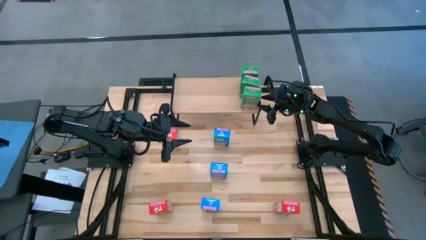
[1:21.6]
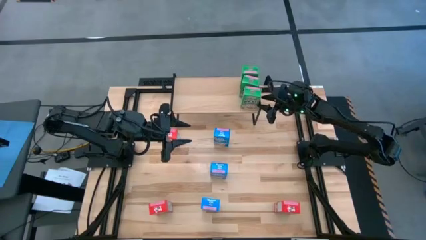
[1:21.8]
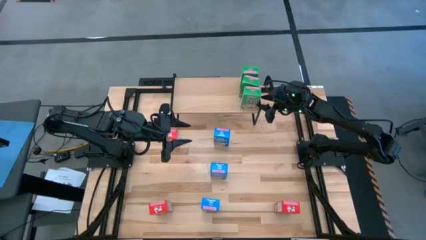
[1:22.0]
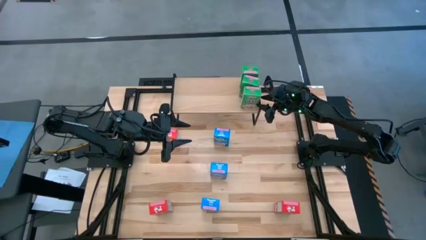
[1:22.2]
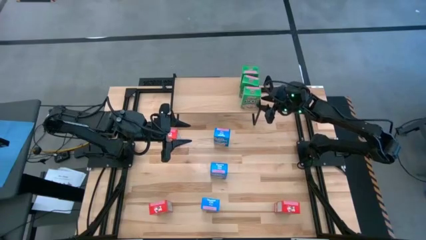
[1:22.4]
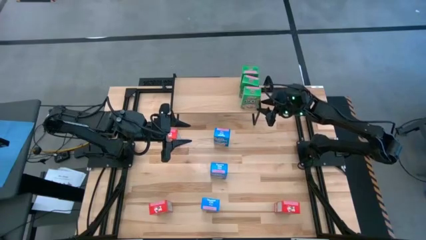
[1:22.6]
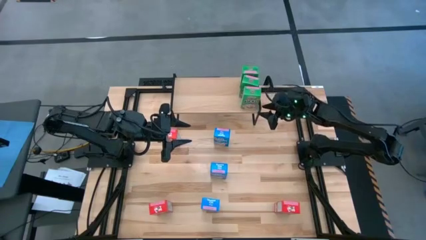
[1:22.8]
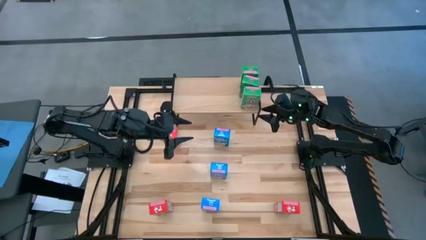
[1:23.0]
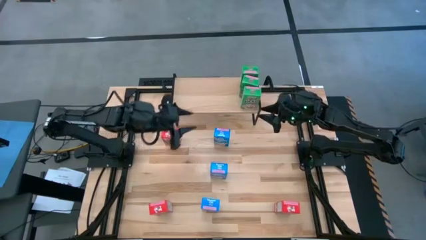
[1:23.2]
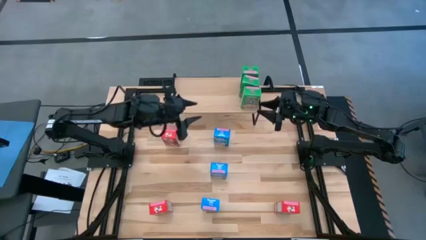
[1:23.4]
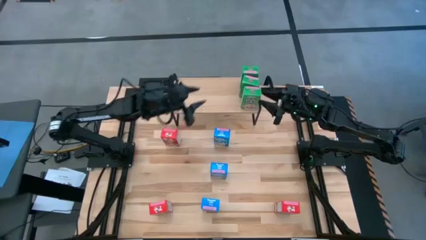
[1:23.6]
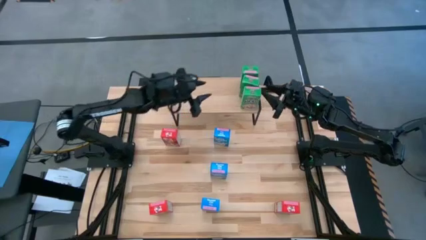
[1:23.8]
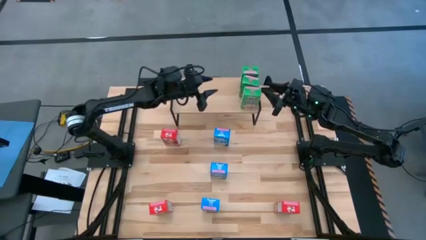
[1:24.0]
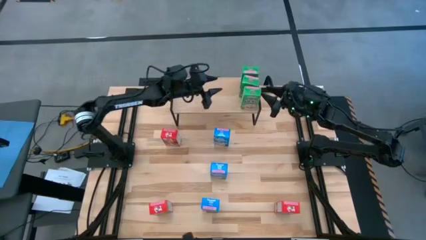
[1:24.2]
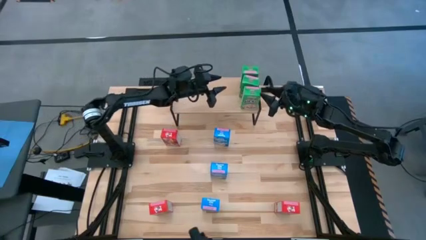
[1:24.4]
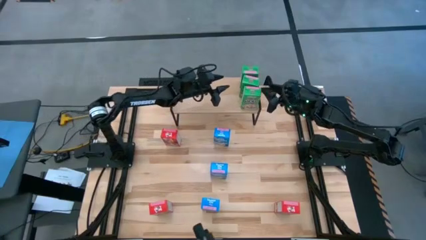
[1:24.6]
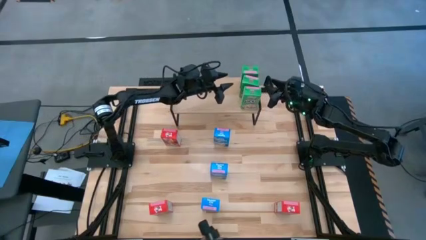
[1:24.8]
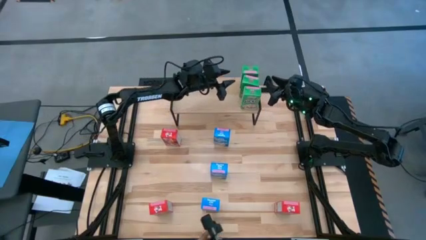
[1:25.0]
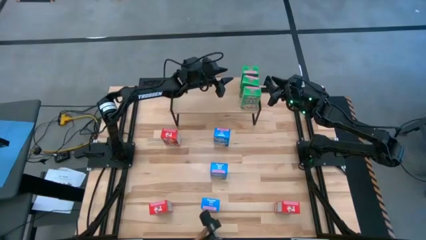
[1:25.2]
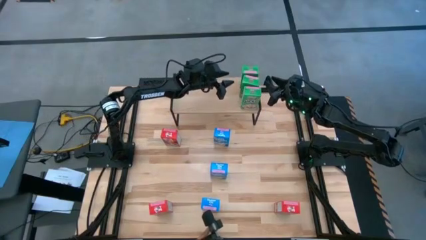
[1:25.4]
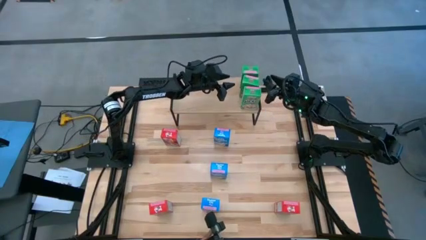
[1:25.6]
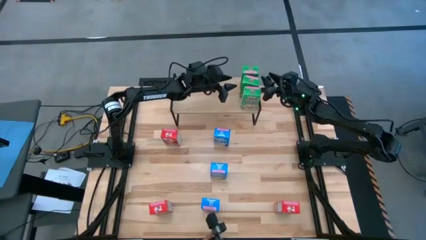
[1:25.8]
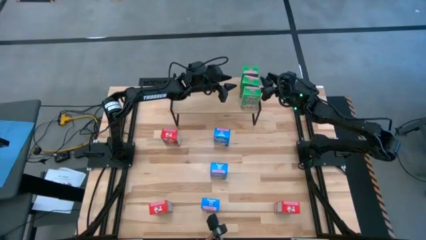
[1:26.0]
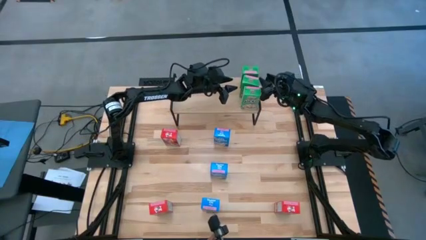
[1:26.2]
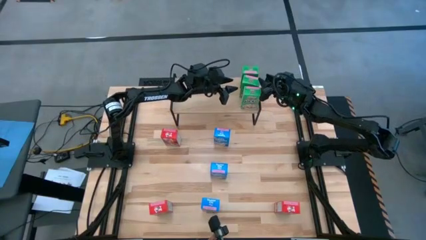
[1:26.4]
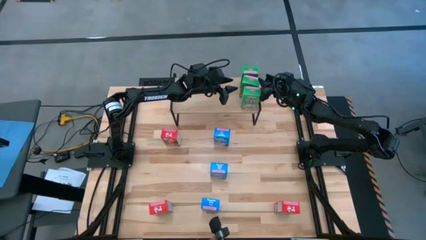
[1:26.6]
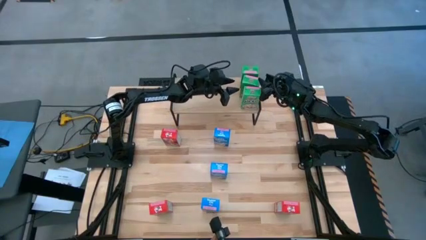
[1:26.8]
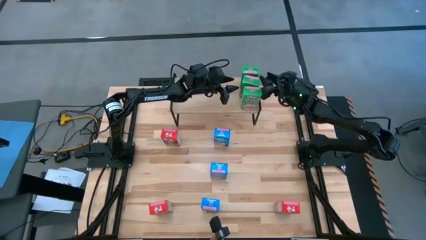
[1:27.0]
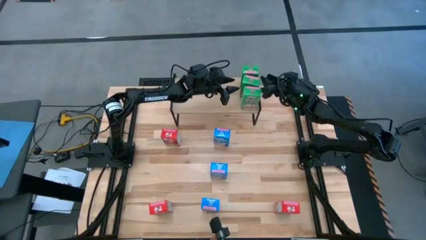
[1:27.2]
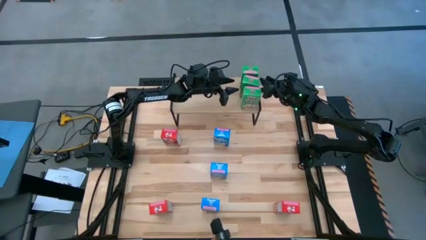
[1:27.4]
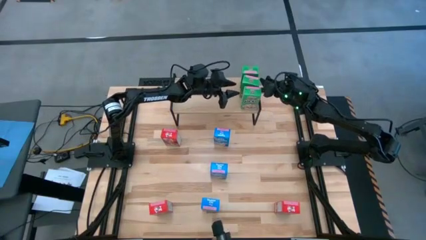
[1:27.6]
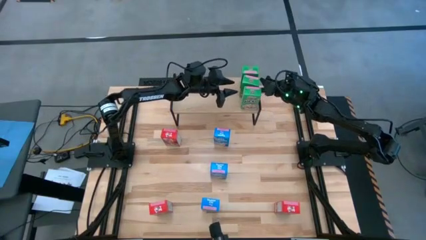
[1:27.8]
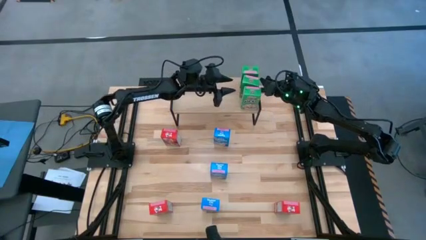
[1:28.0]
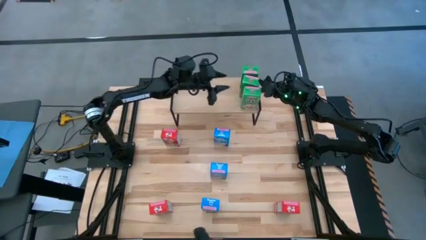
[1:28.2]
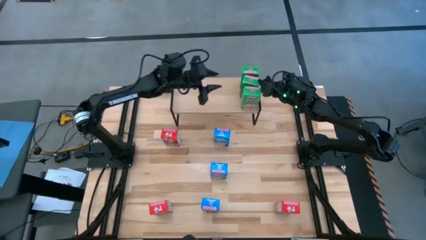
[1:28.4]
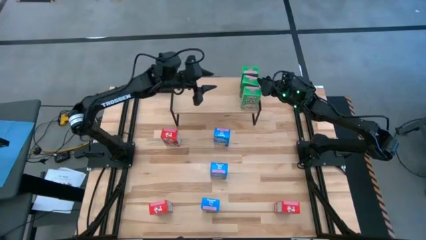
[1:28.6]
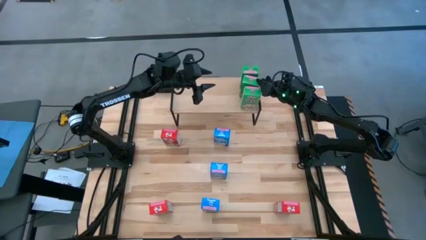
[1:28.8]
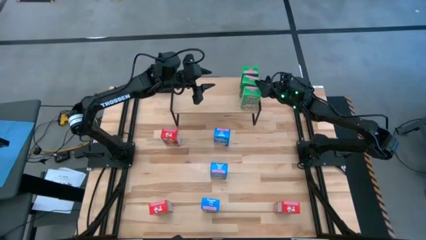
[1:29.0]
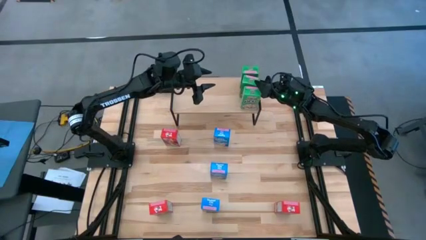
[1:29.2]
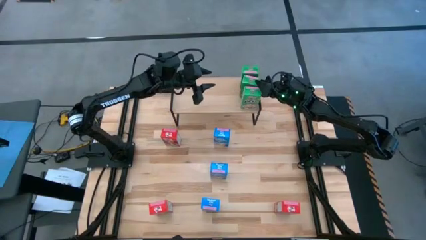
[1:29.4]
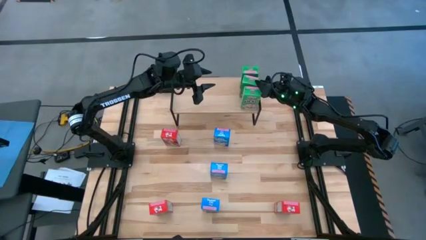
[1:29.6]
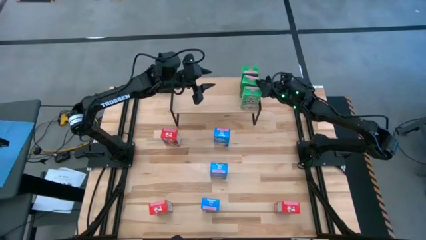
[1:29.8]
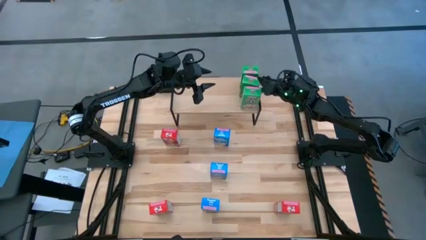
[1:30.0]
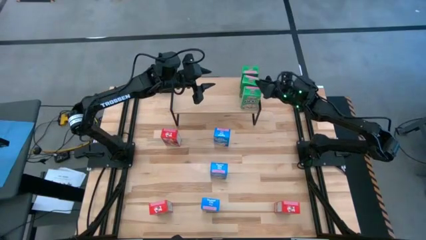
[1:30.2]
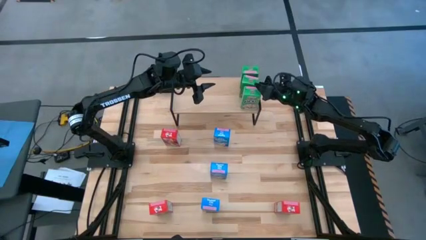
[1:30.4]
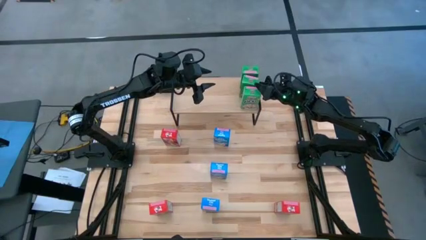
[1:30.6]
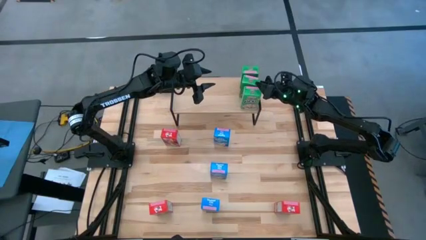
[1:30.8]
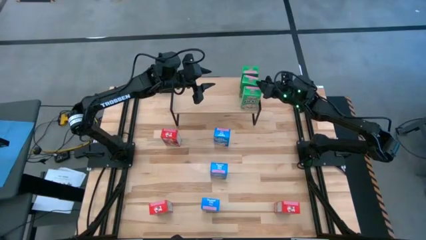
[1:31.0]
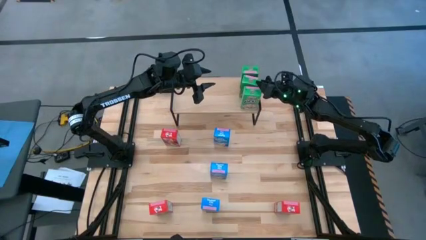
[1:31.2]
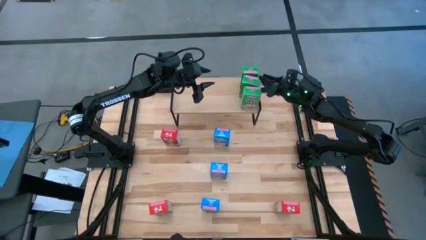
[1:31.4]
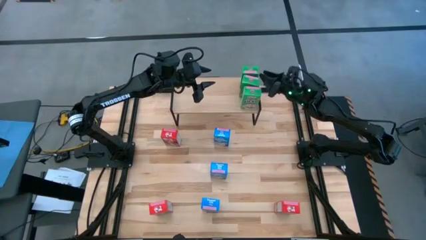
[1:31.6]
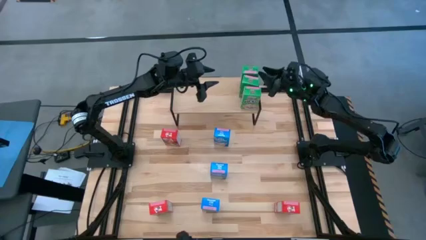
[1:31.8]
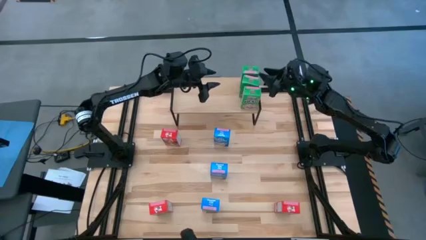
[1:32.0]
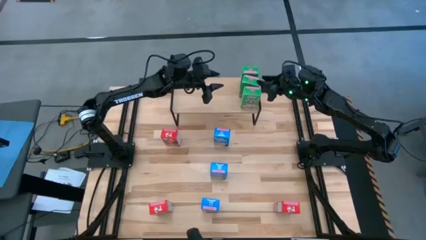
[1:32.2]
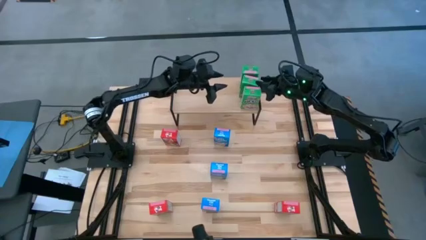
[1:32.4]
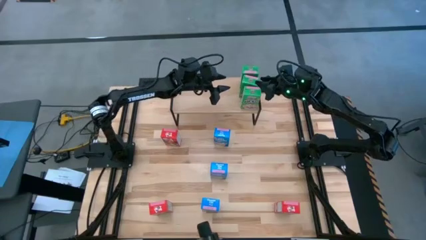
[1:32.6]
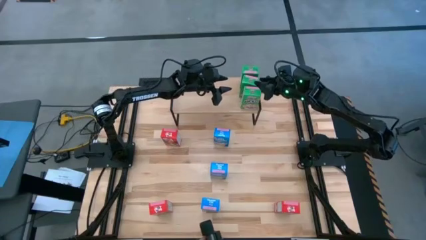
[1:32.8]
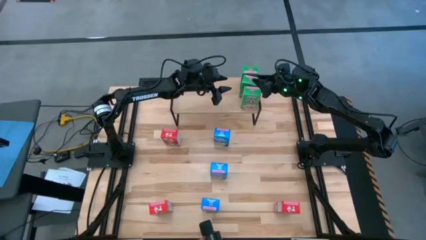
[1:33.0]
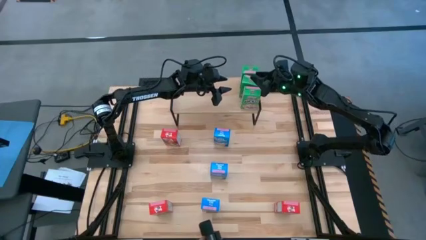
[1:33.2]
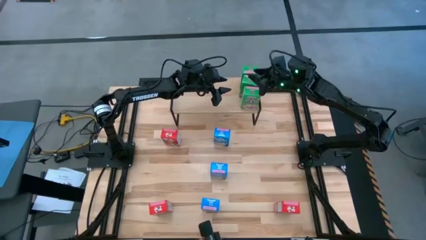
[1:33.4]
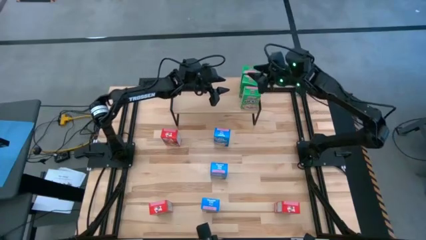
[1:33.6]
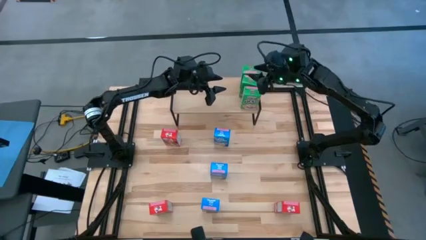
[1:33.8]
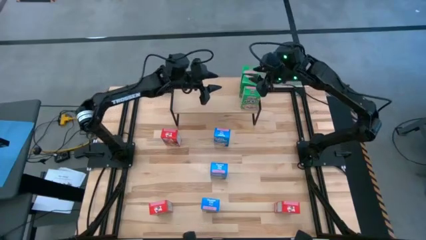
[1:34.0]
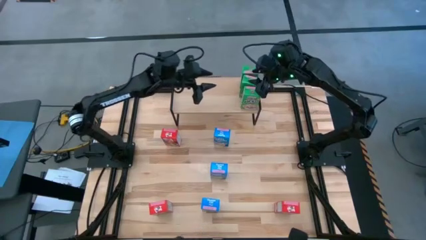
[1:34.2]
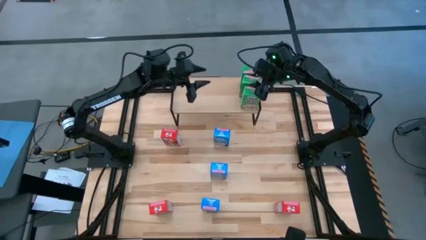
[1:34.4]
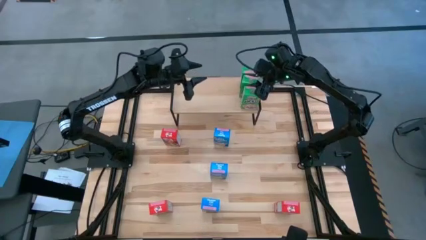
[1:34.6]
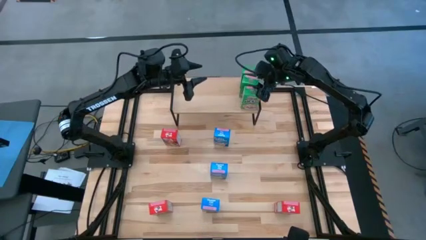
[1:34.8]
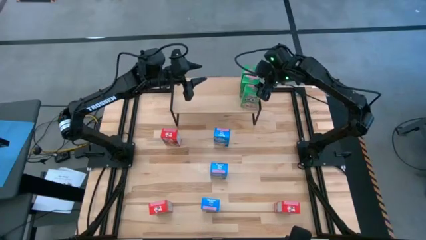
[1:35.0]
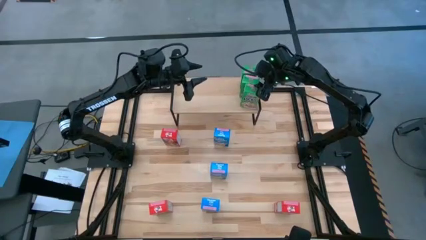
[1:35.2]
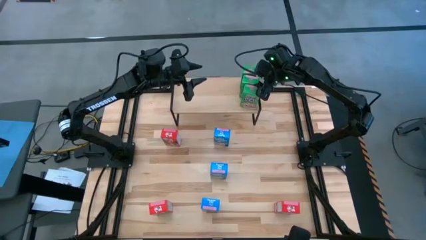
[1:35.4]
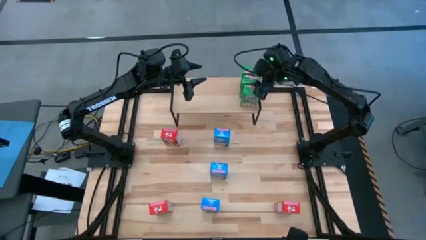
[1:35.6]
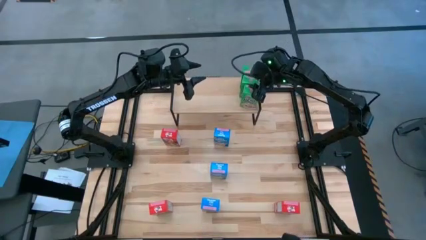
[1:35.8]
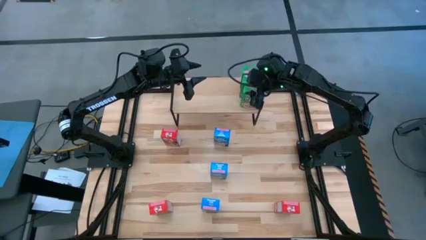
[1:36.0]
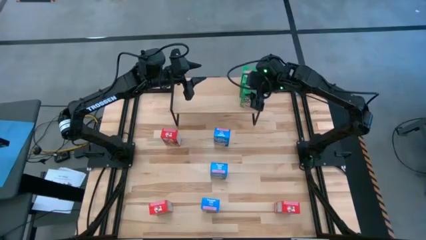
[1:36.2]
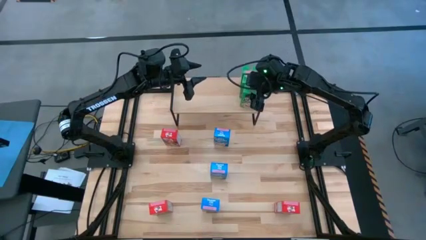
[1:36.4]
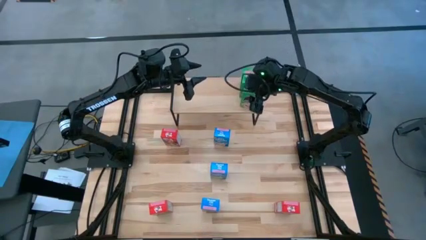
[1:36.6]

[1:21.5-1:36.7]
Task: Stack cereal on shelf
Adjust the green cereal boxes on the shelf
